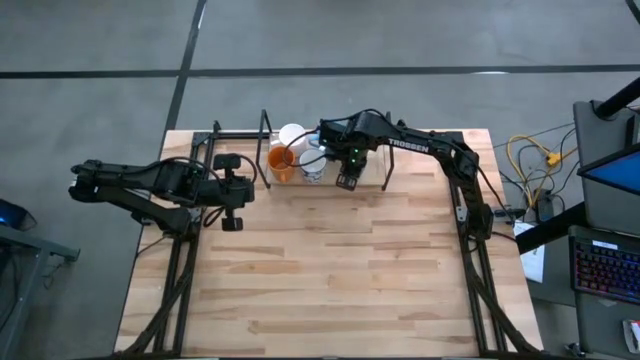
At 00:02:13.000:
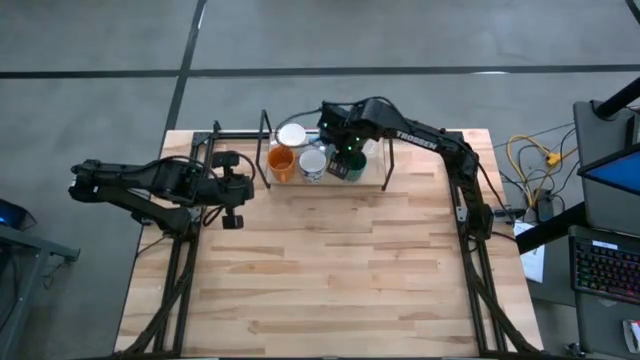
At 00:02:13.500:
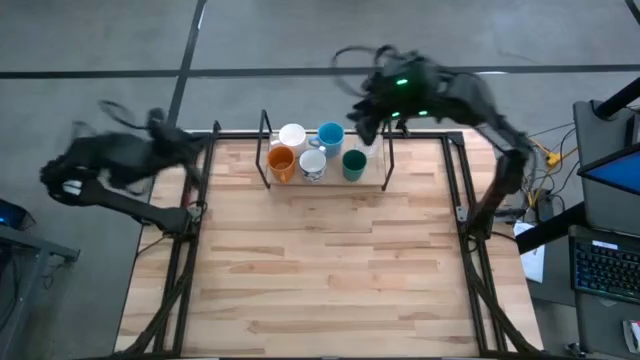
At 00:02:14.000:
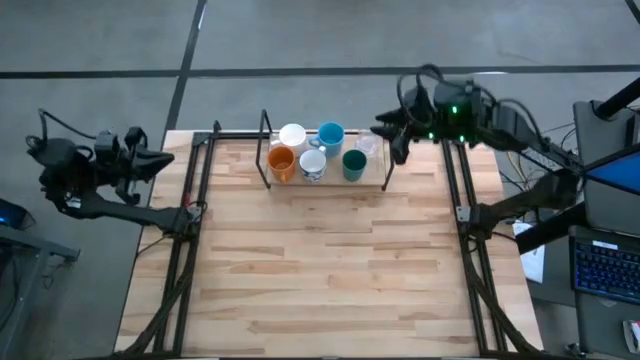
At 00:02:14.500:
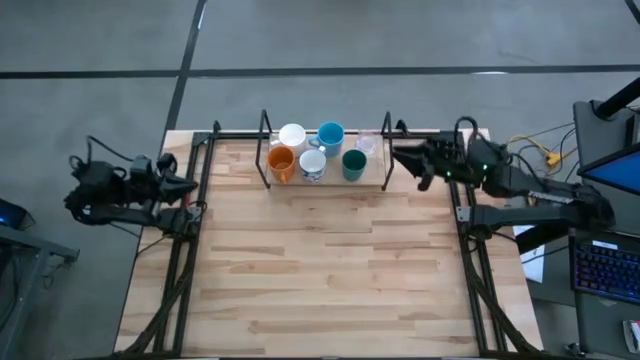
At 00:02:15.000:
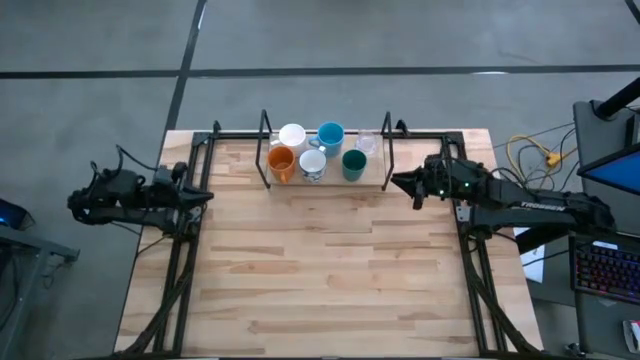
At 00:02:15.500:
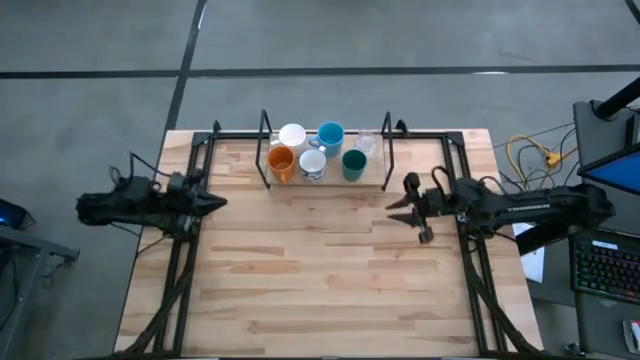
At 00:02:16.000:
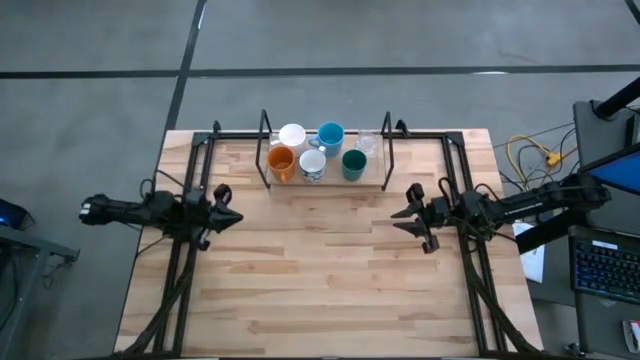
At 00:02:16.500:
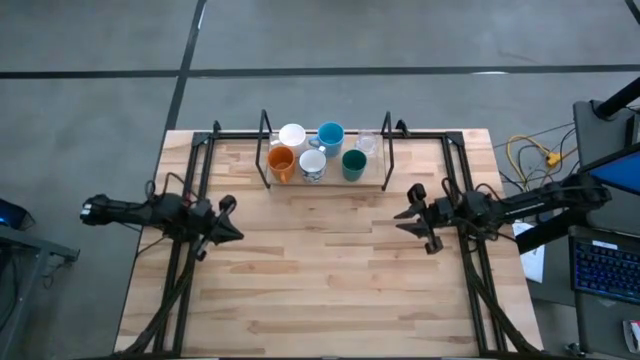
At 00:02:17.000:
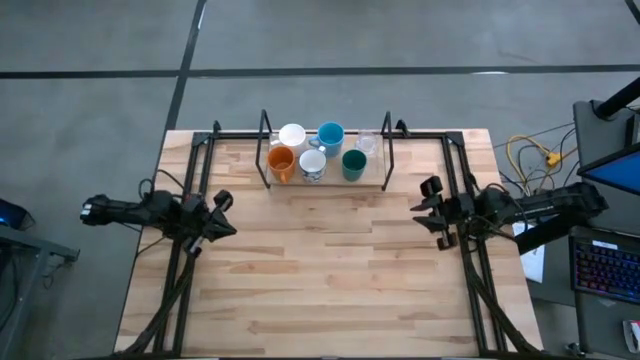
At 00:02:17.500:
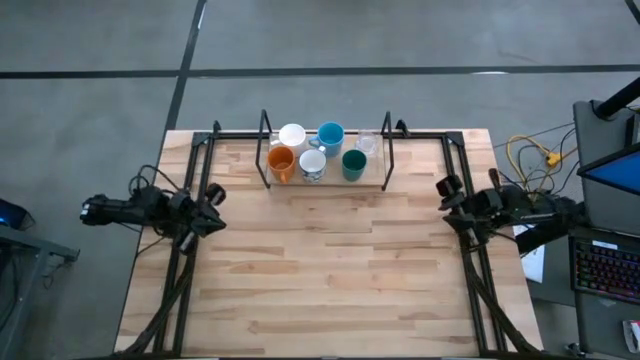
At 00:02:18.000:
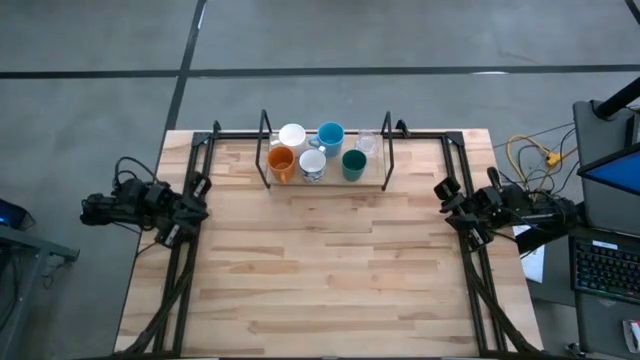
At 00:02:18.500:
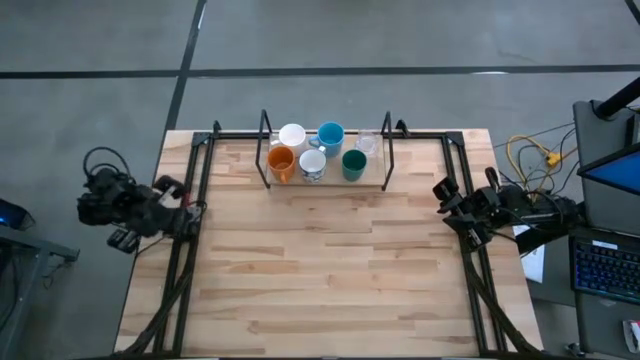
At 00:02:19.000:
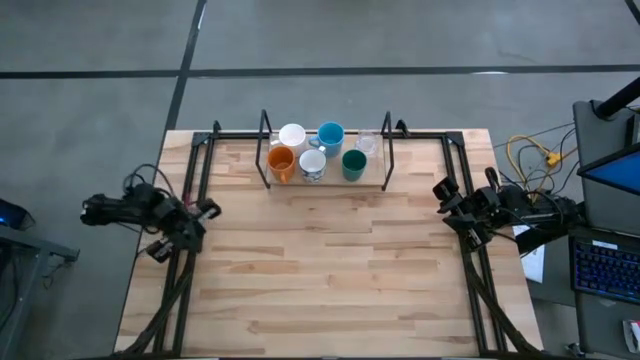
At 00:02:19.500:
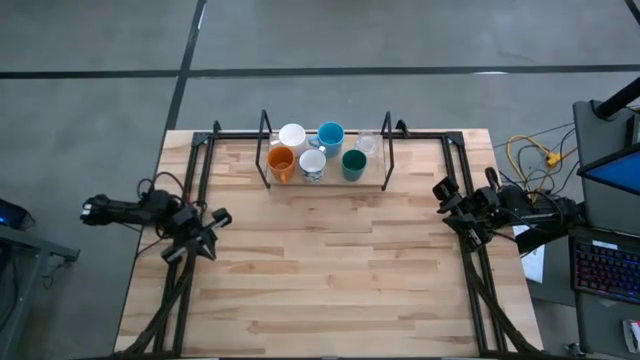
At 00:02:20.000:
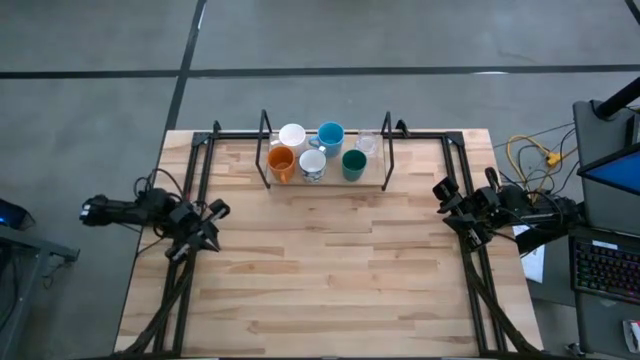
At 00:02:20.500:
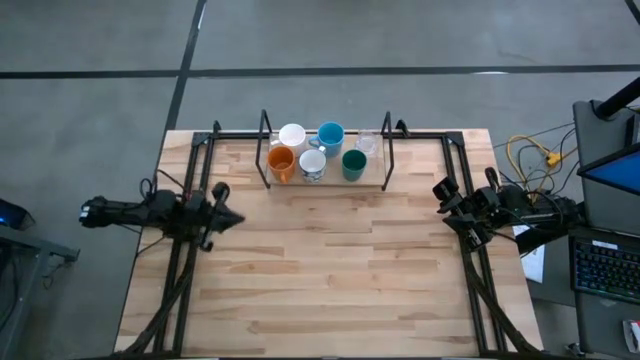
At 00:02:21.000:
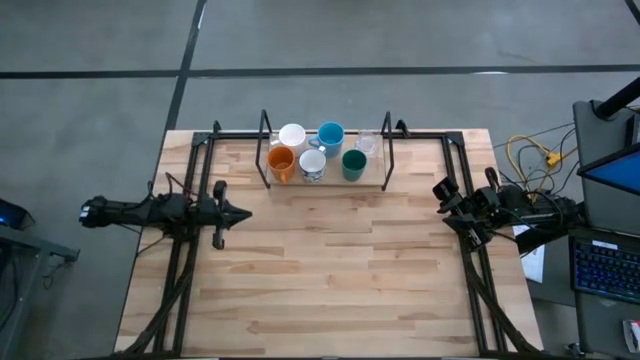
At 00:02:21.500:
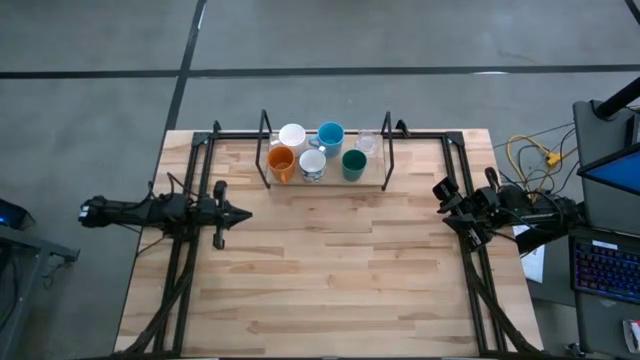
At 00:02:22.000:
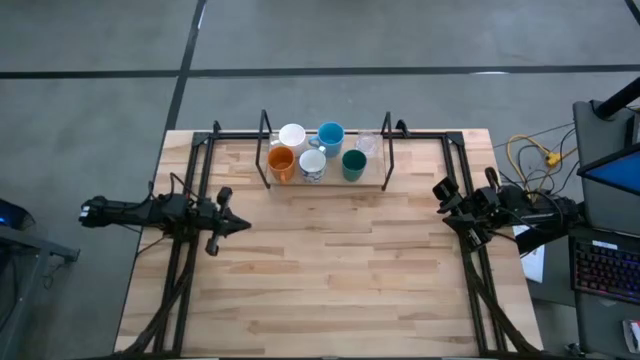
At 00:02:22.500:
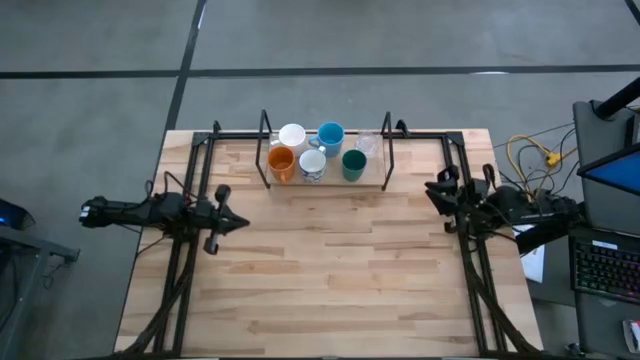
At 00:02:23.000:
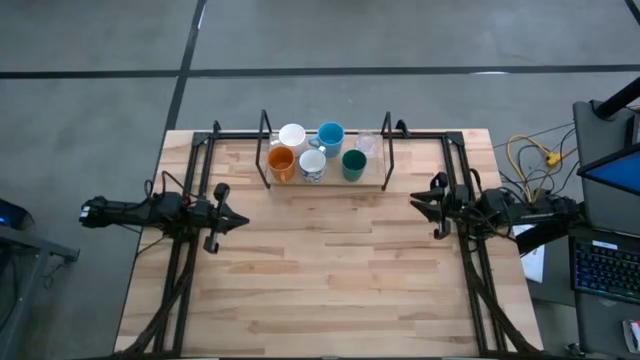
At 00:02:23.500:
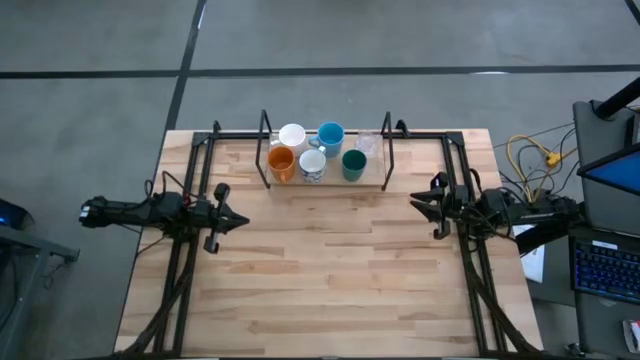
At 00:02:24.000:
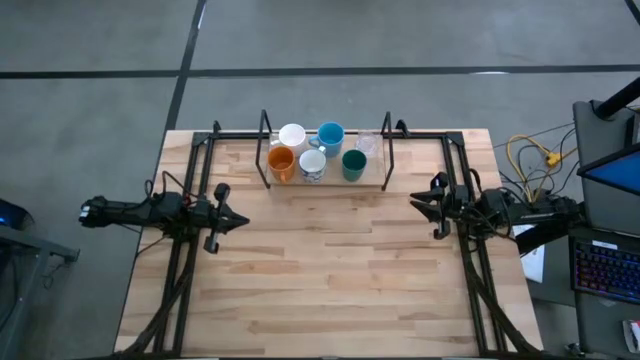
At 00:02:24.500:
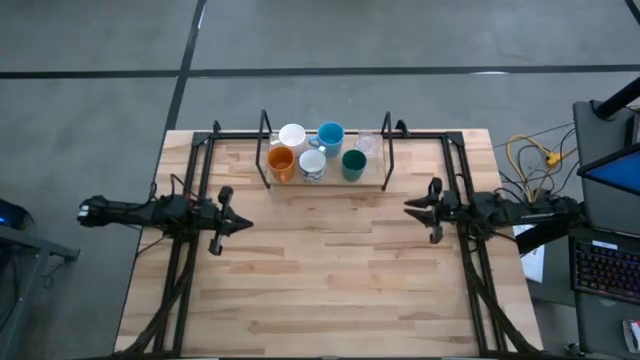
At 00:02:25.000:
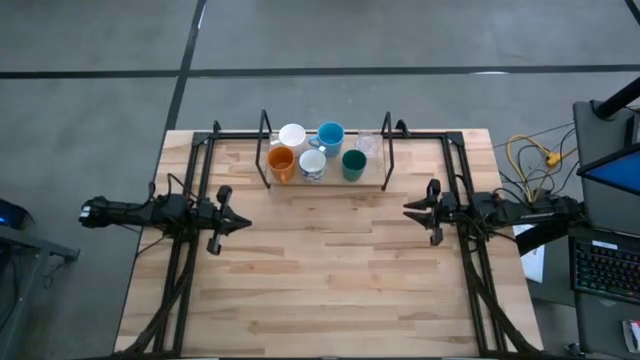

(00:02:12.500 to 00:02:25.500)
Task: Stack small to large cups/mugs on shelf
Return to Home Position

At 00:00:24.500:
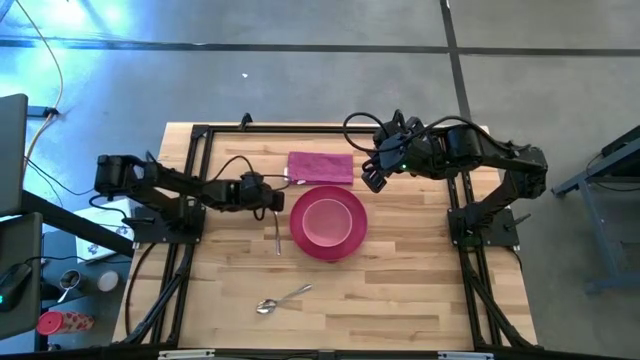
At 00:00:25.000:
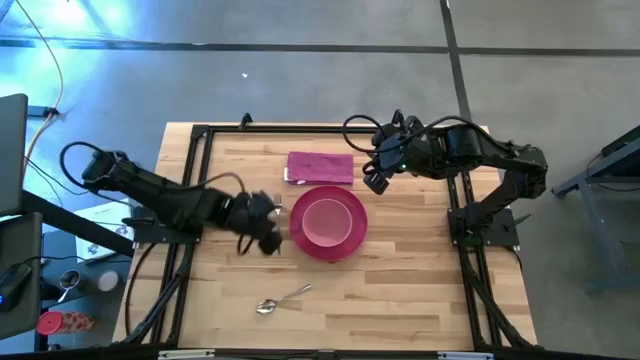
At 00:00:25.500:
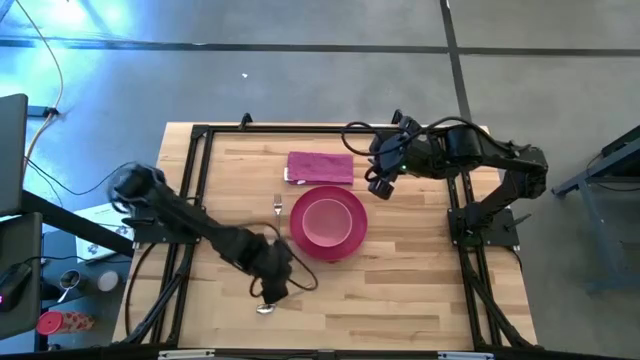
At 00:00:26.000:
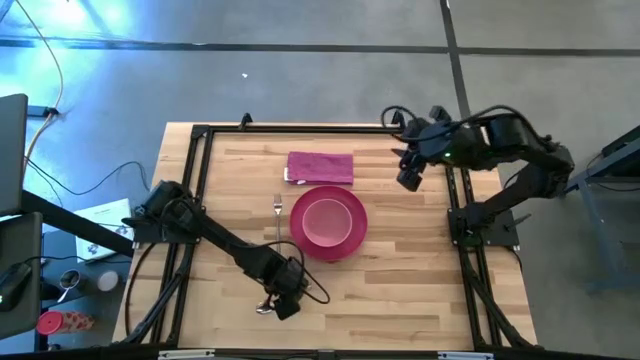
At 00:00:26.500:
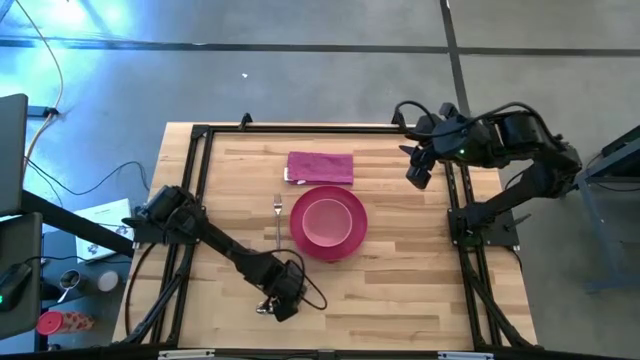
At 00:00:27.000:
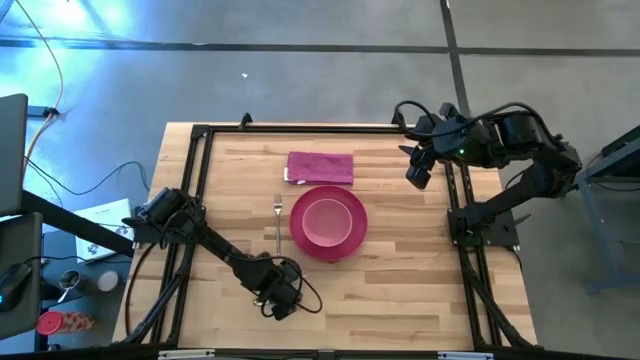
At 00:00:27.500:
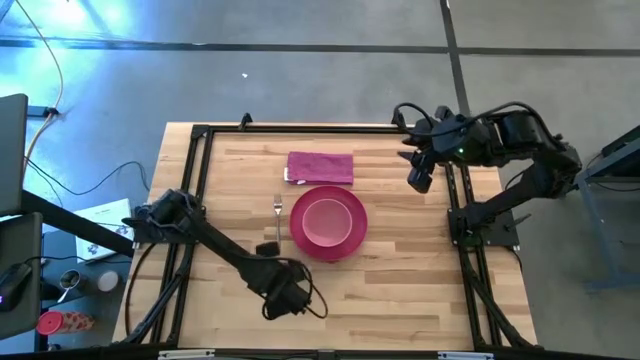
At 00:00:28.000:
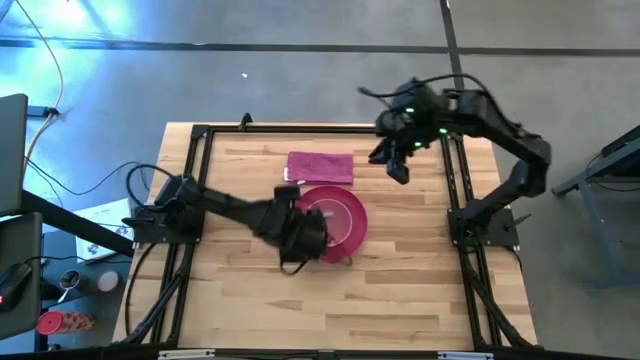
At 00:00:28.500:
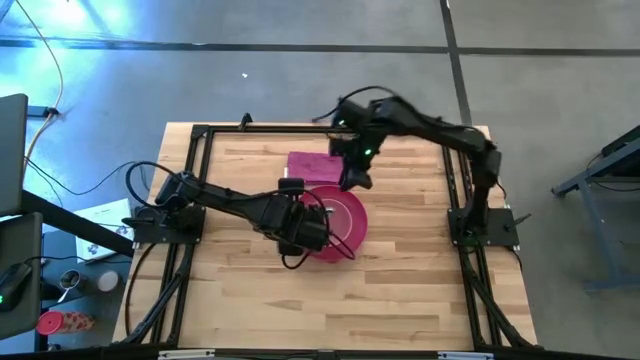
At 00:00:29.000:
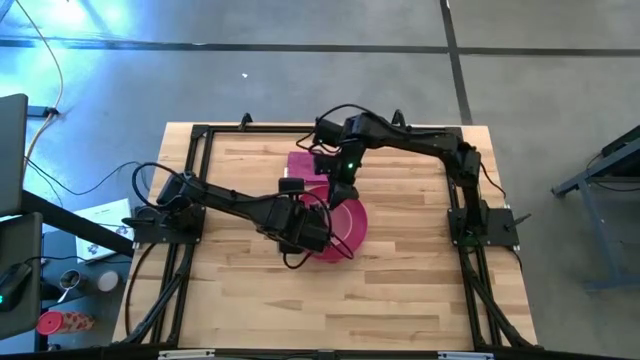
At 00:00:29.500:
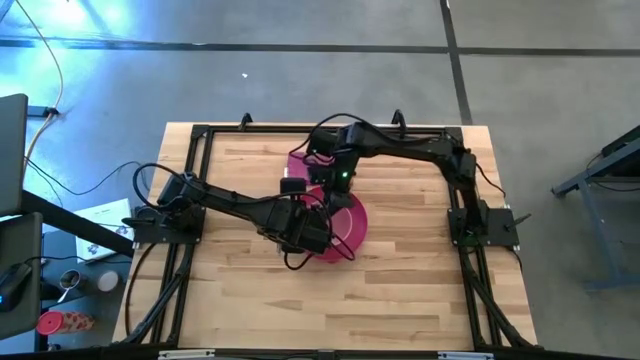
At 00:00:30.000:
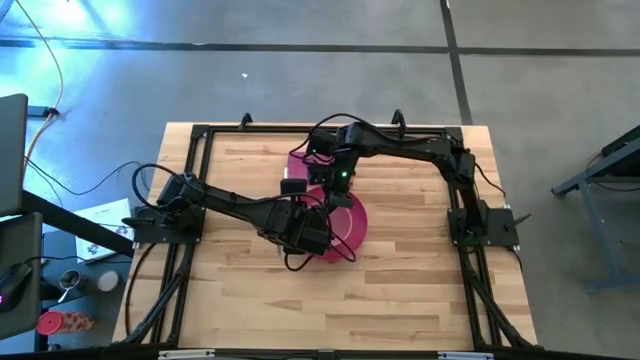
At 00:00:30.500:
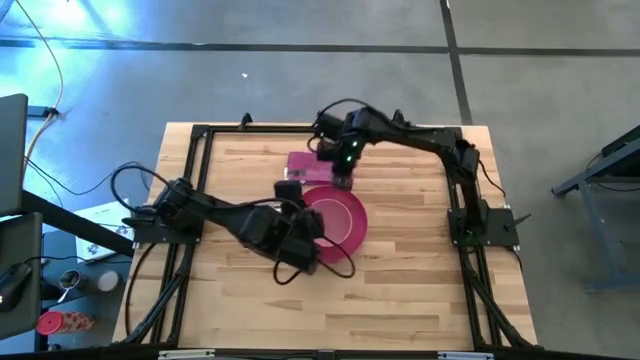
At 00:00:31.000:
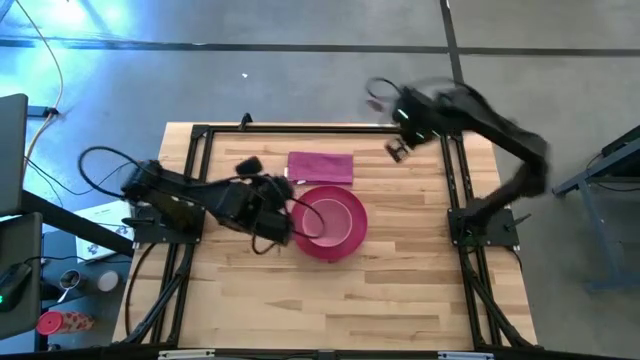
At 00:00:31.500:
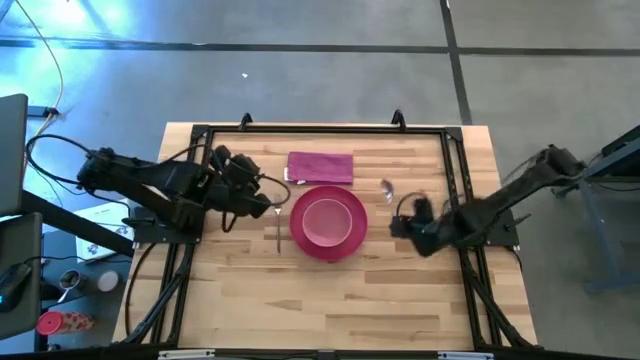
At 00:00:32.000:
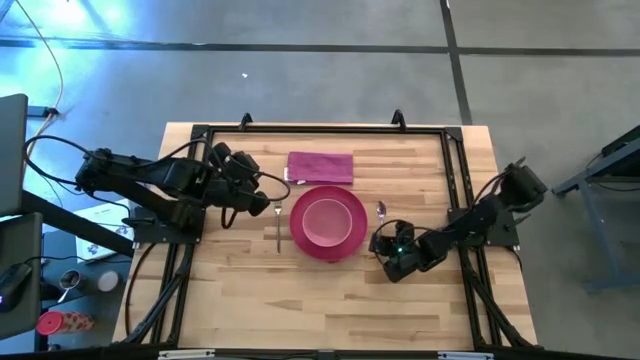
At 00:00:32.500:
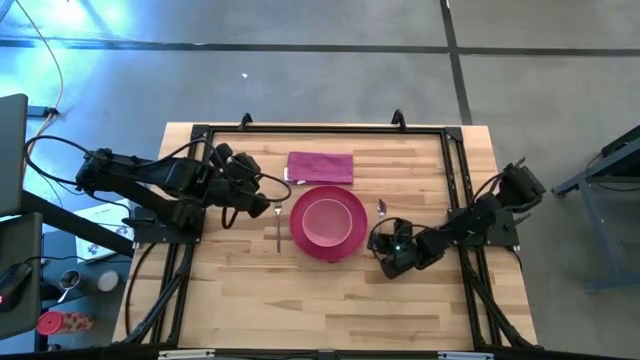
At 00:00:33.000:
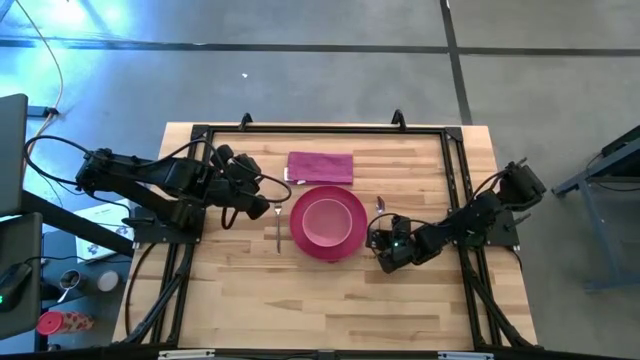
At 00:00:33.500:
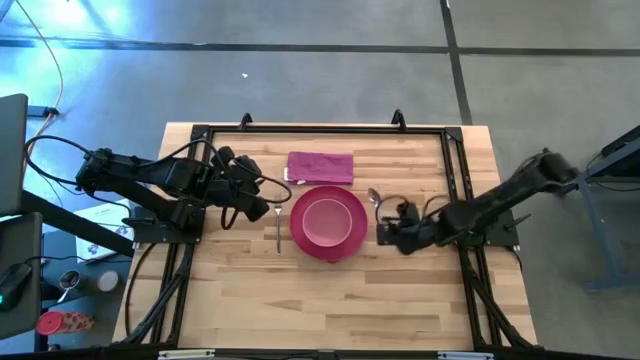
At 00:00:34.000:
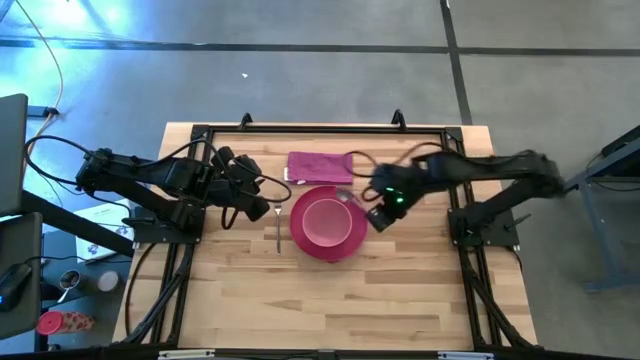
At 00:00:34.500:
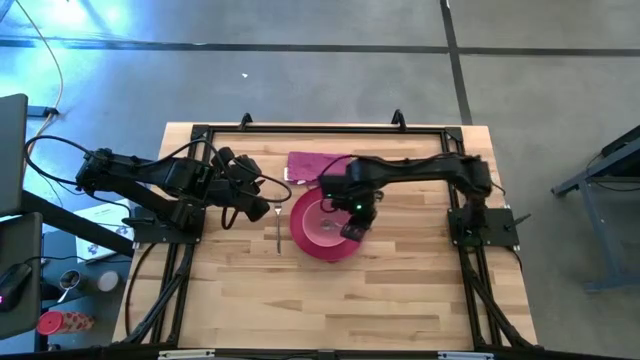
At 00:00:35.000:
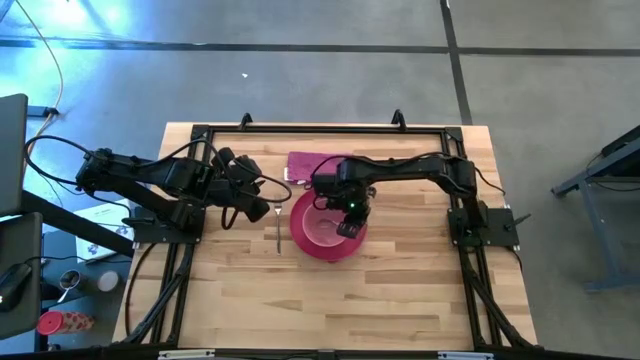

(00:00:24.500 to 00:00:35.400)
Task: Set table place
Put the silver spoon into the pink bowl
